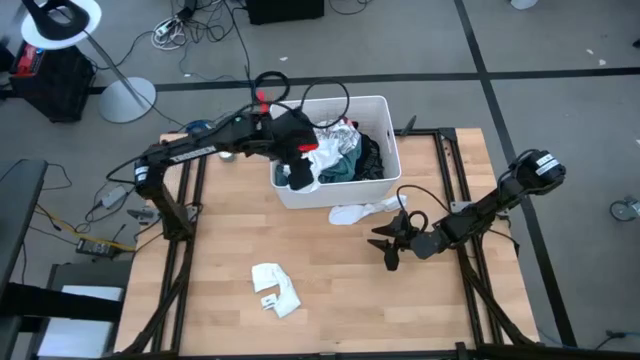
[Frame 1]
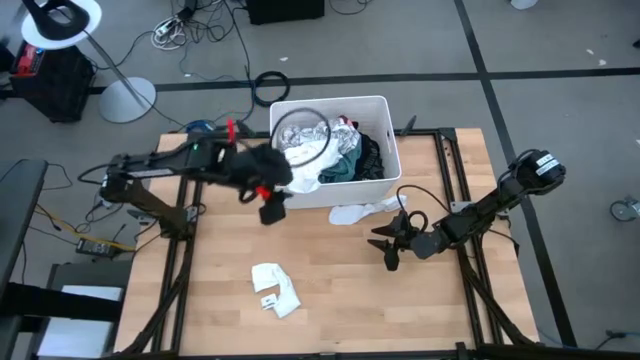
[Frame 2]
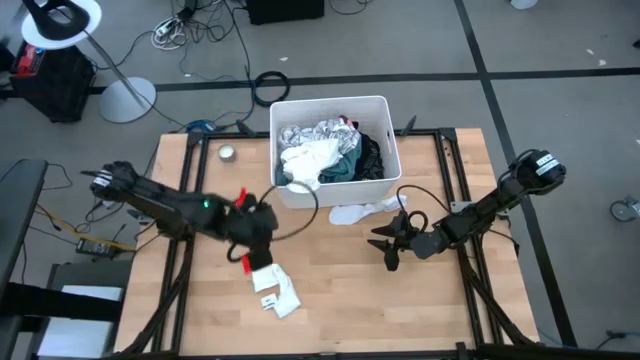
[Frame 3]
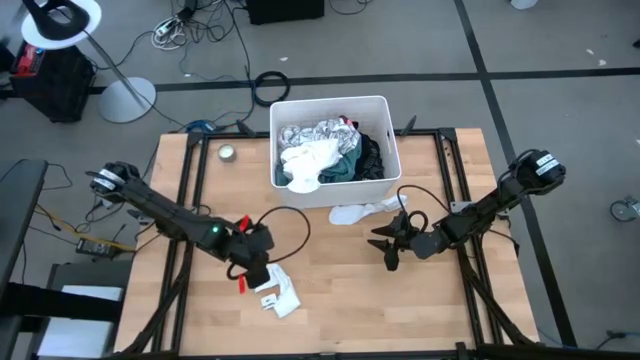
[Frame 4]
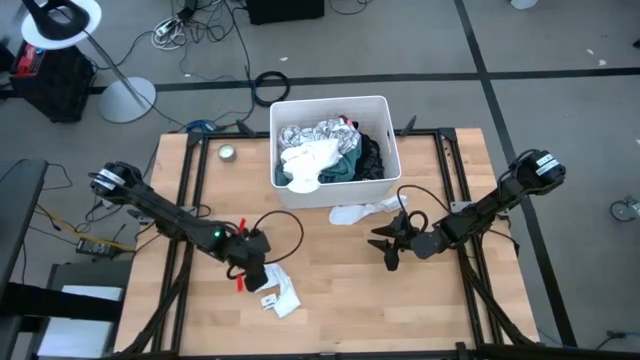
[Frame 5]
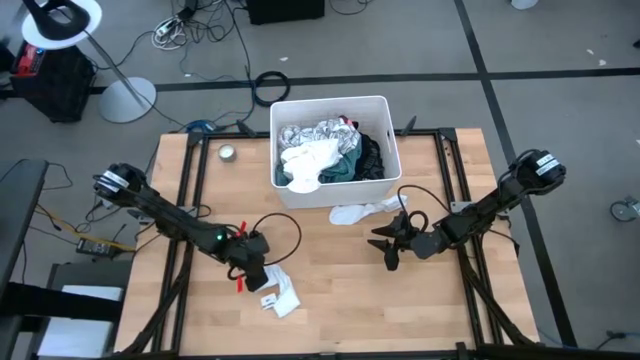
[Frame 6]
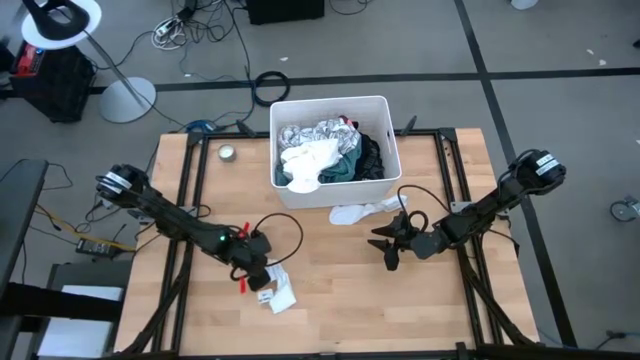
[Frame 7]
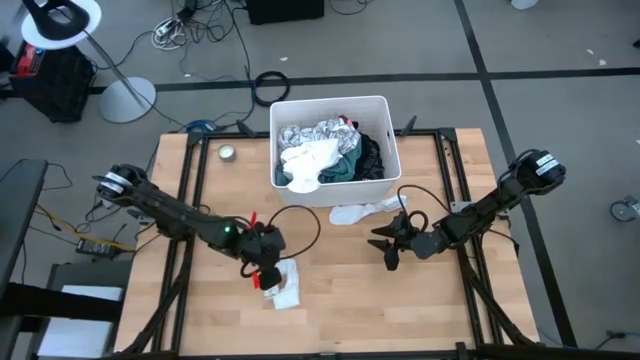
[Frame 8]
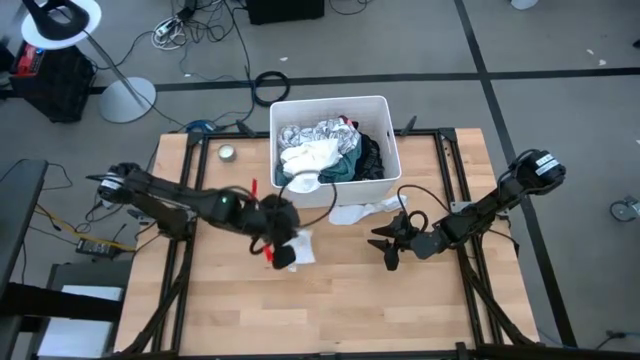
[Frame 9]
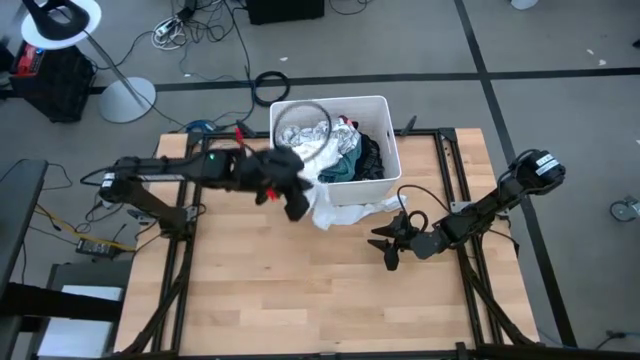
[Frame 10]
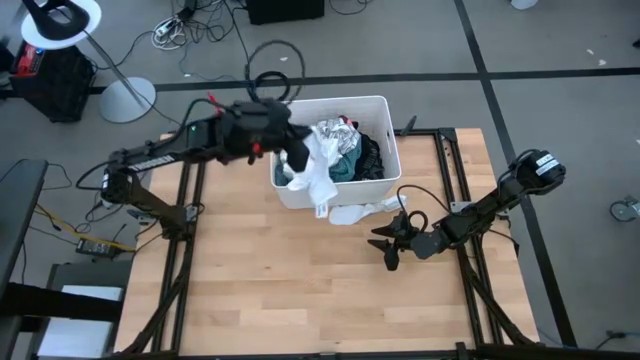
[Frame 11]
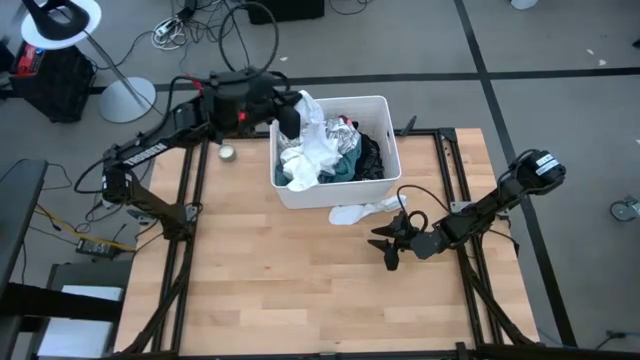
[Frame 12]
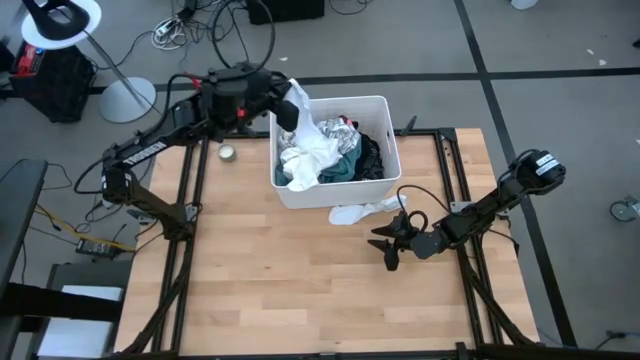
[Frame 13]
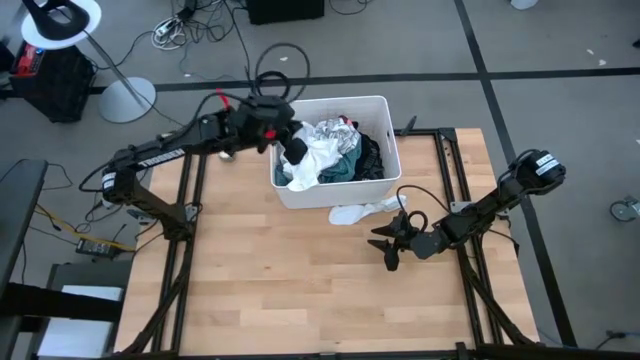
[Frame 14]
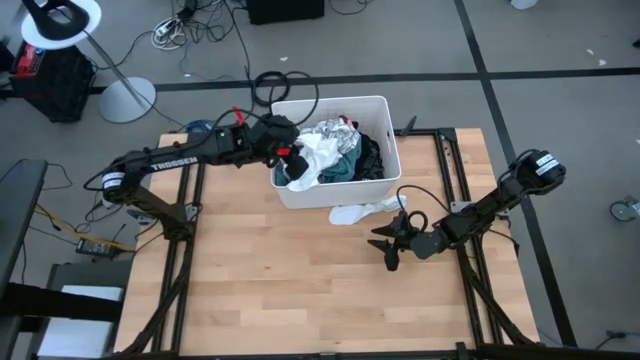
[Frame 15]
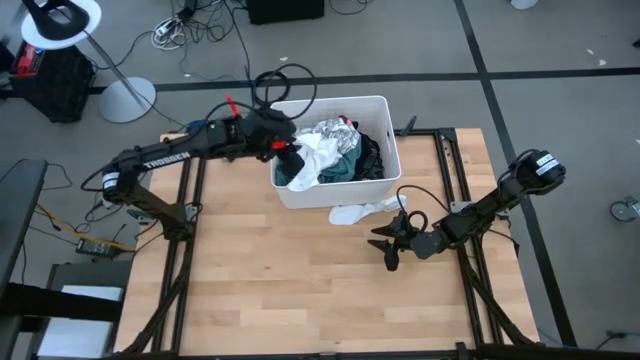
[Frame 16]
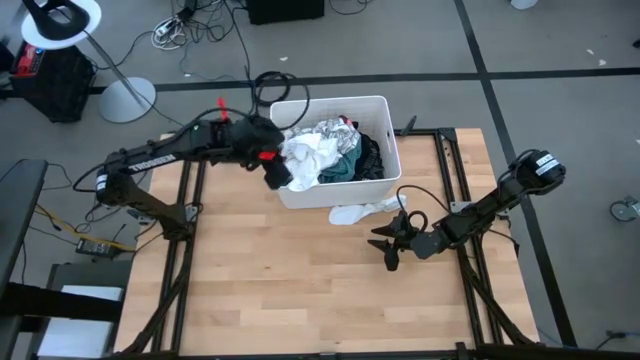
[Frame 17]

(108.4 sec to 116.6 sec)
Task: Sort clothes
Put the left white sock into the white laundry organizer

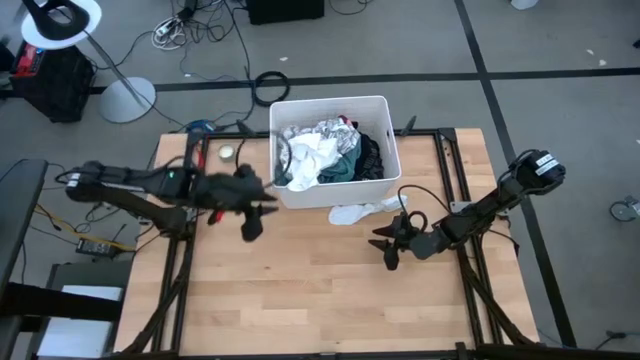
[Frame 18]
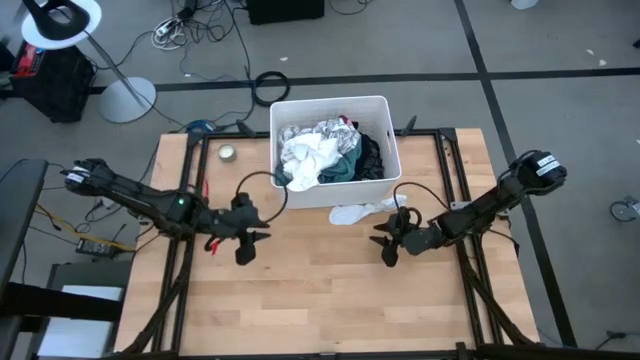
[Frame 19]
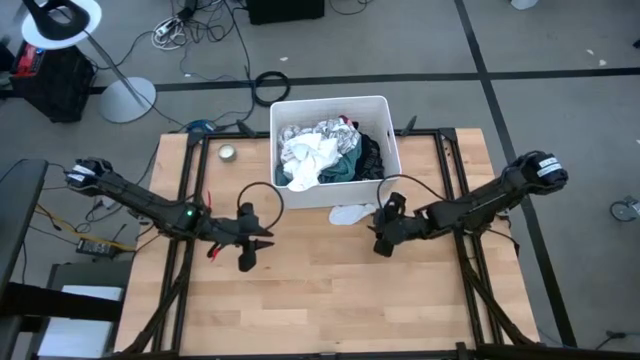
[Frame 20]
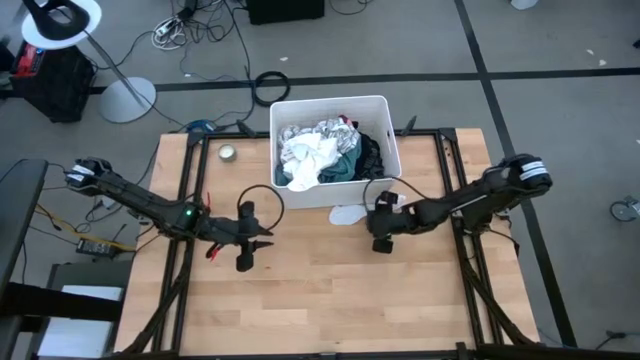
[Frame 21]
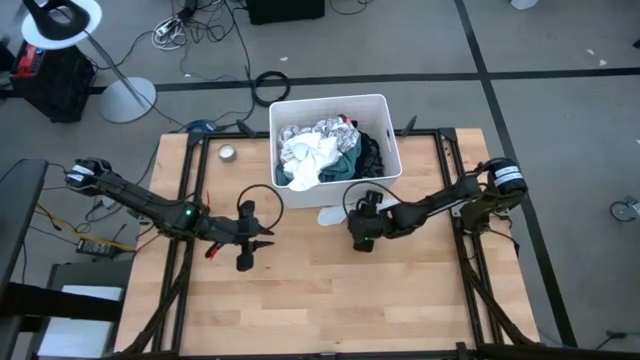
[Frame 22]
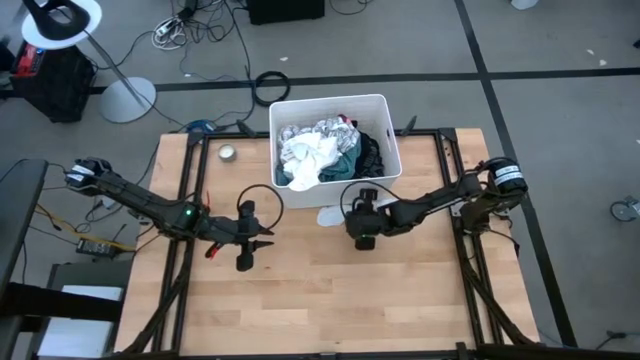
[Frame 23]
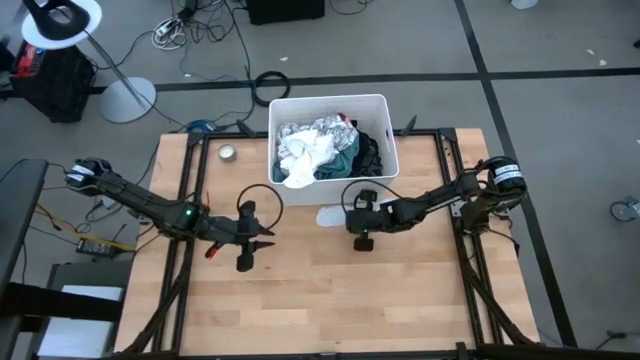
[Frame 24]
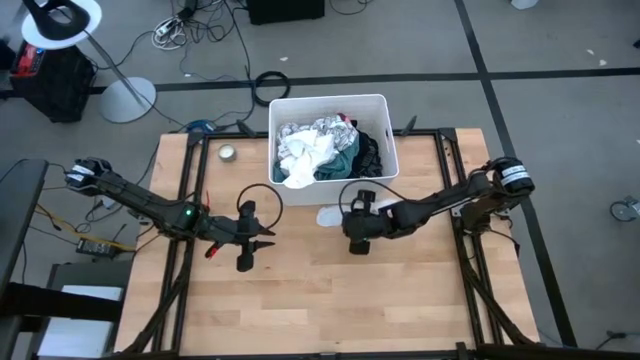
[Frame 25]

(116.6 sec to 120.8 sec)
Put the white sock into the white laundry organizer

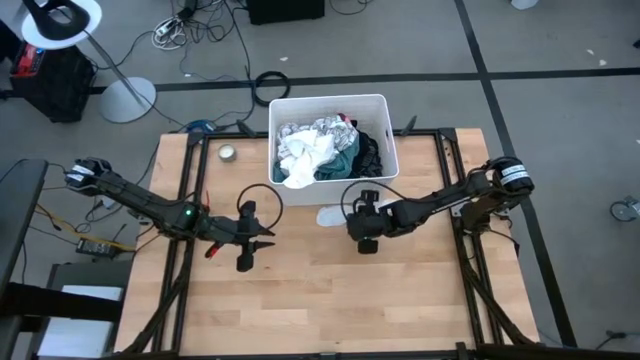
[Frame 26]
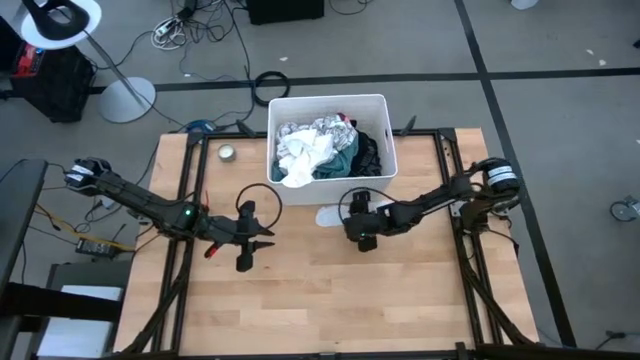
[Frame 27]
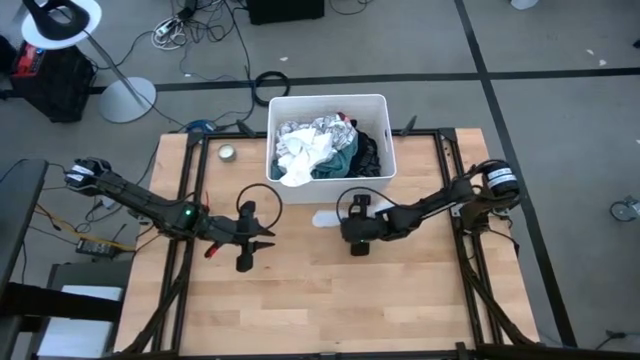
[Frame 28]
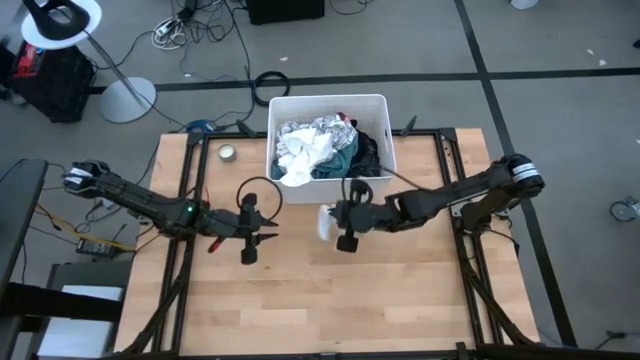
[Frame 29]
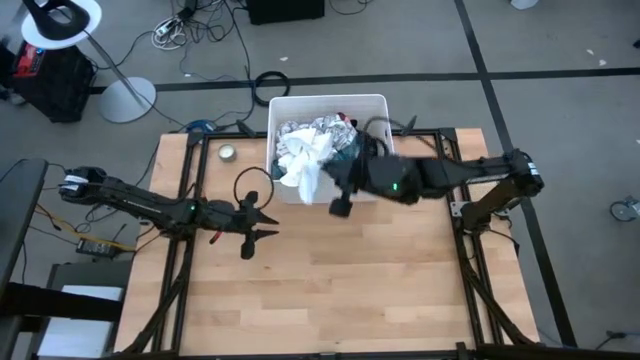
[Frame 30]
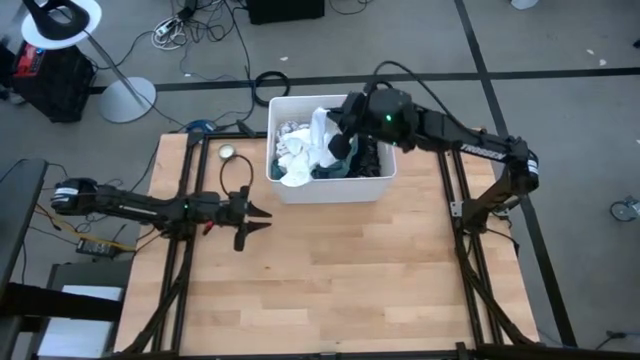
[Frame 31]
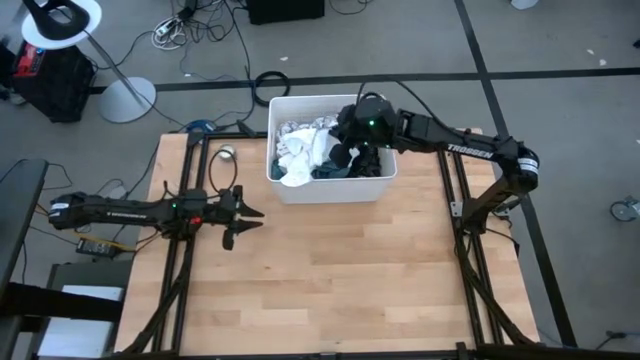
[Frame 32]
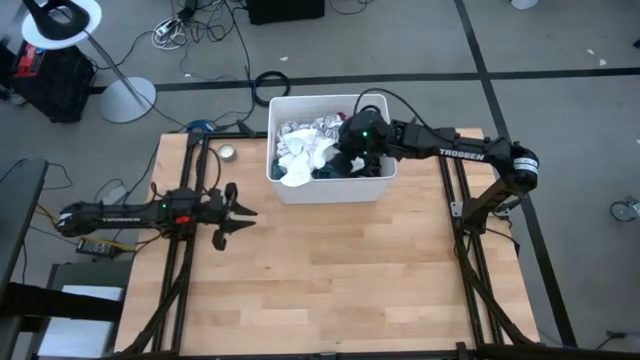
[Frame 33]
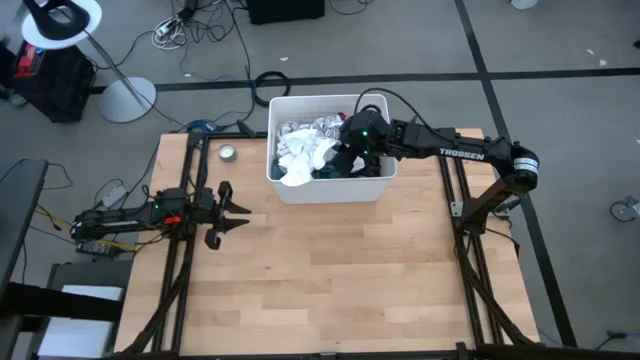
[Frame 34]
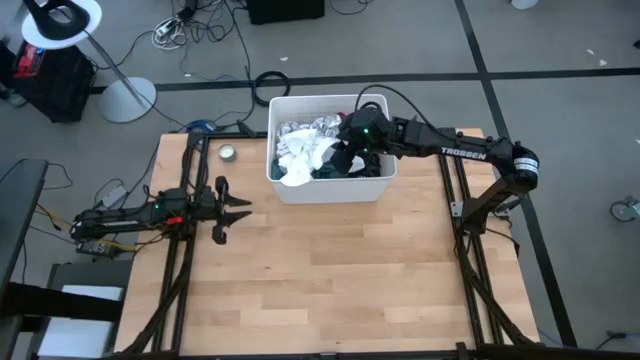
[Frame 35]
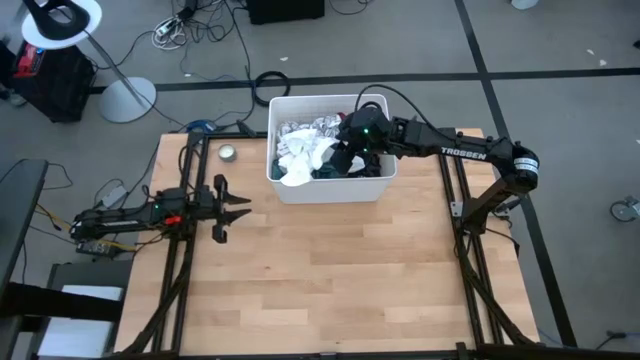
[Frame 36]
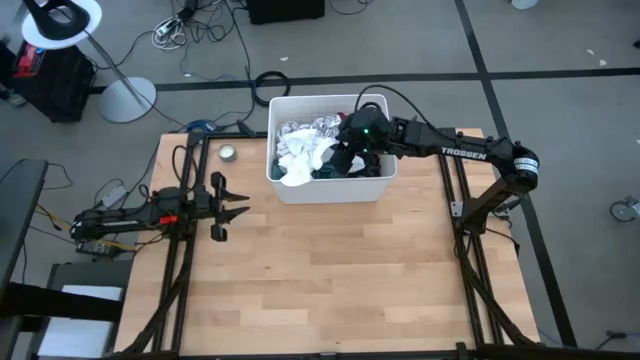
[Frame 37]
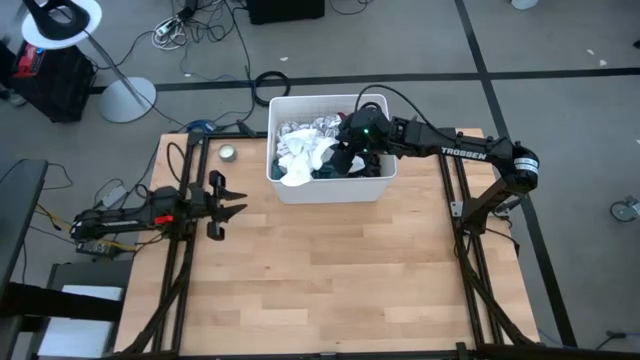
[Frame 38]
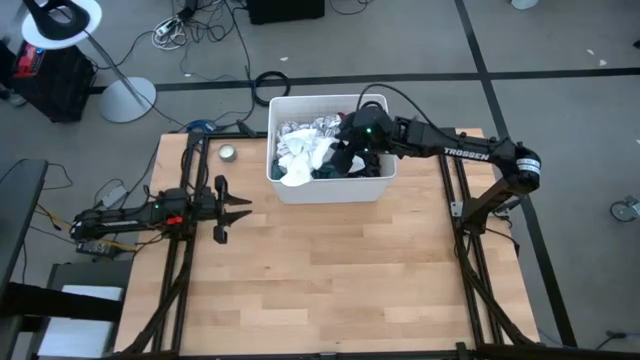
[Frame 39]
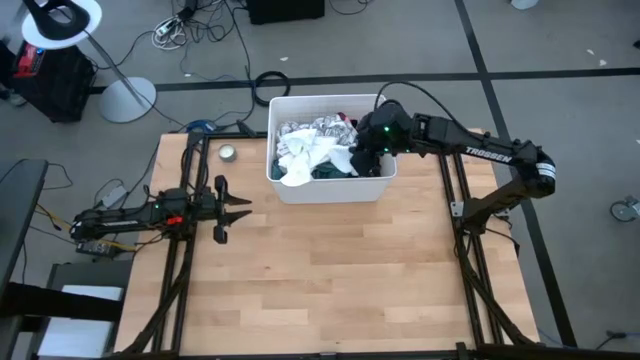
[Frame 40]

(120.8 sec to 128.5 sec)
Put the white sock into the white laundry organizer
